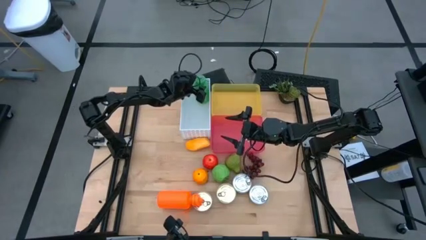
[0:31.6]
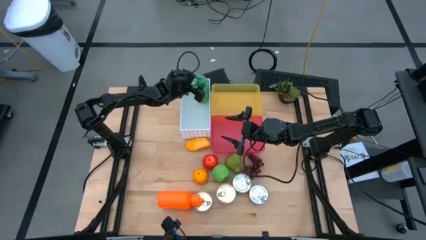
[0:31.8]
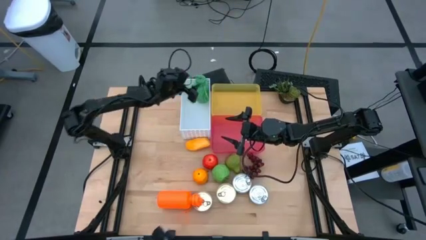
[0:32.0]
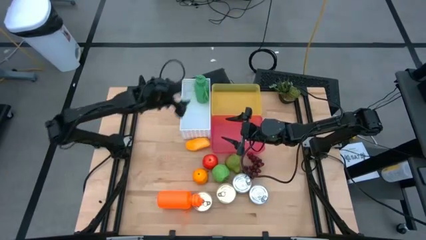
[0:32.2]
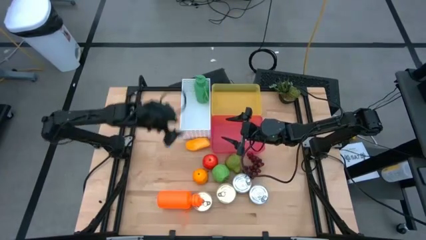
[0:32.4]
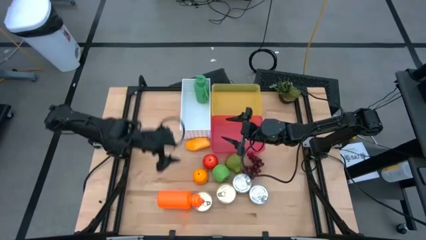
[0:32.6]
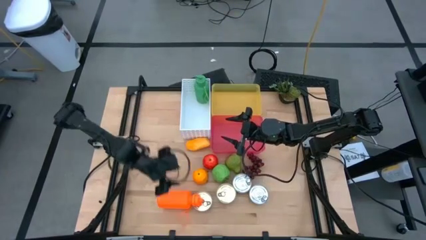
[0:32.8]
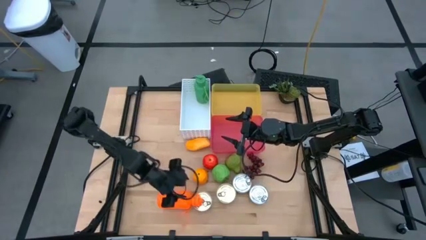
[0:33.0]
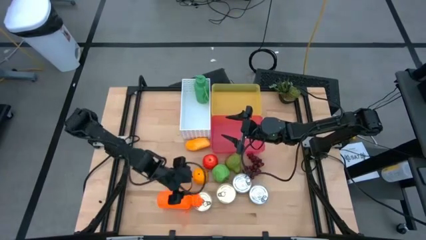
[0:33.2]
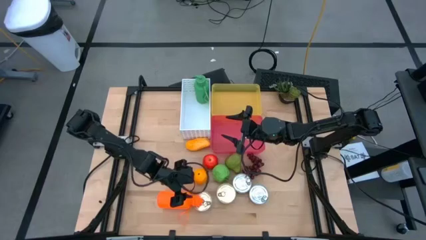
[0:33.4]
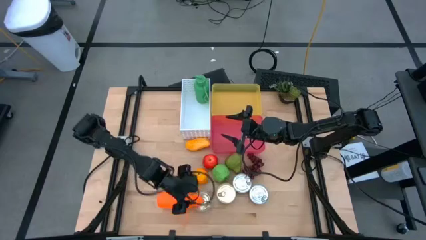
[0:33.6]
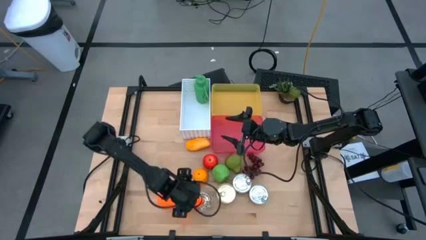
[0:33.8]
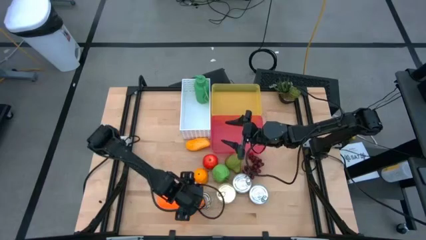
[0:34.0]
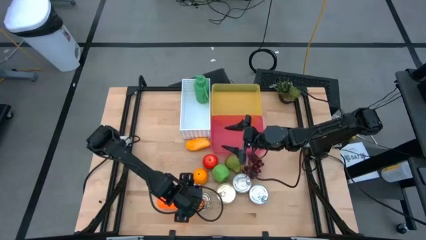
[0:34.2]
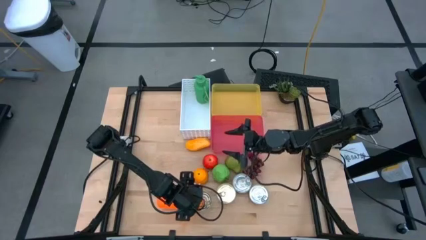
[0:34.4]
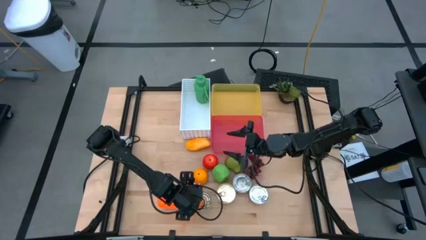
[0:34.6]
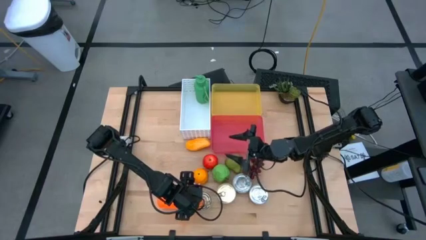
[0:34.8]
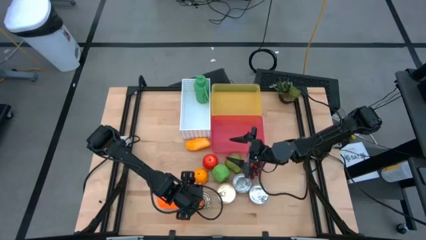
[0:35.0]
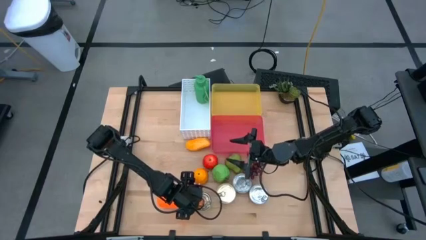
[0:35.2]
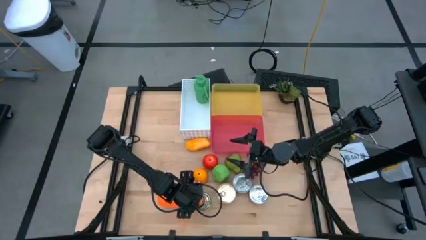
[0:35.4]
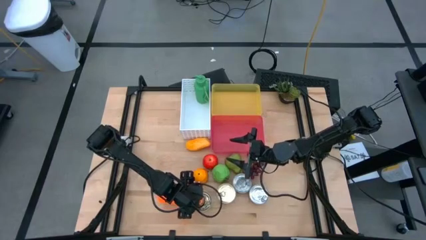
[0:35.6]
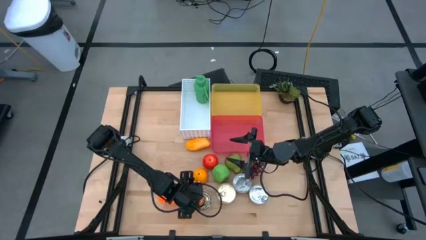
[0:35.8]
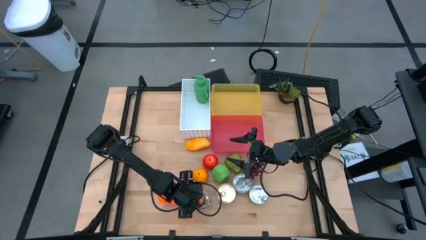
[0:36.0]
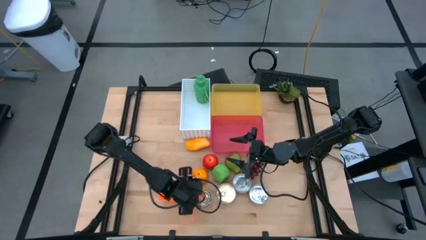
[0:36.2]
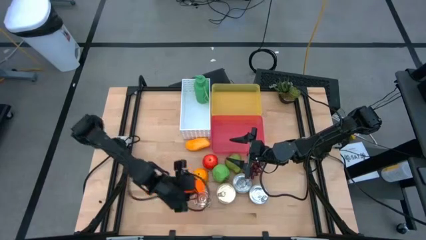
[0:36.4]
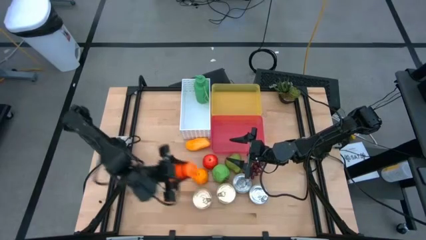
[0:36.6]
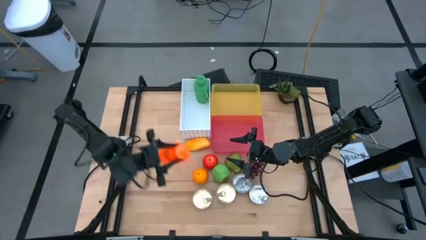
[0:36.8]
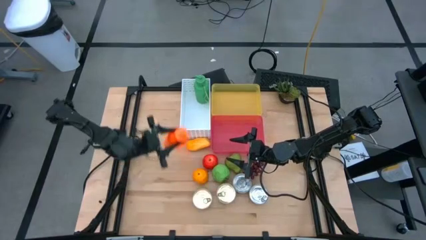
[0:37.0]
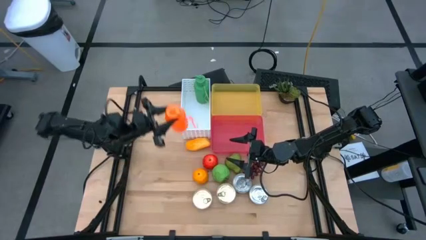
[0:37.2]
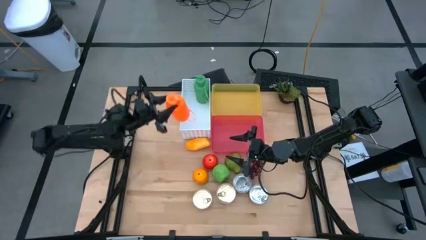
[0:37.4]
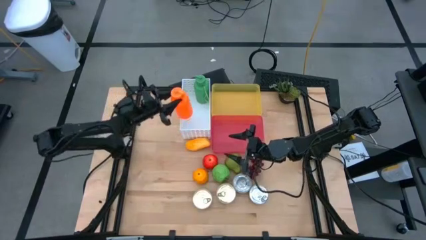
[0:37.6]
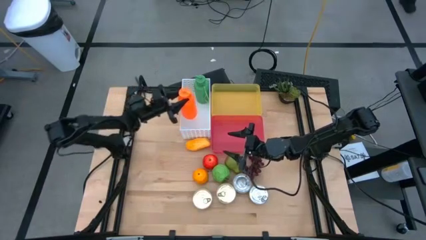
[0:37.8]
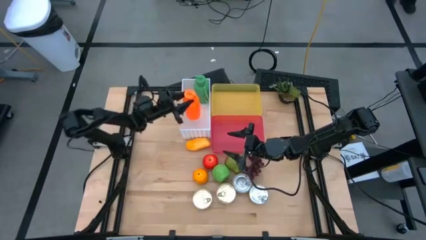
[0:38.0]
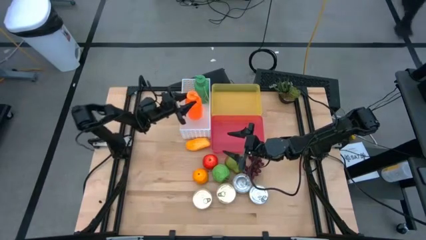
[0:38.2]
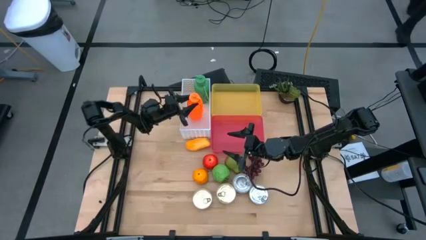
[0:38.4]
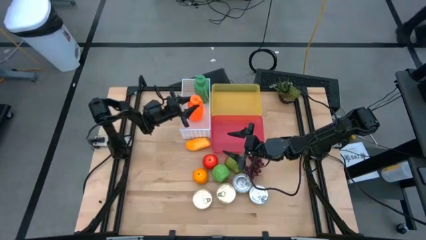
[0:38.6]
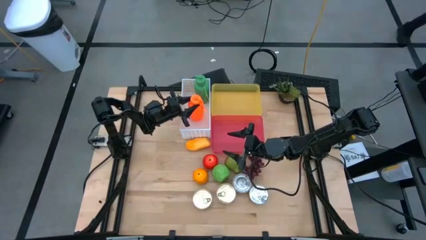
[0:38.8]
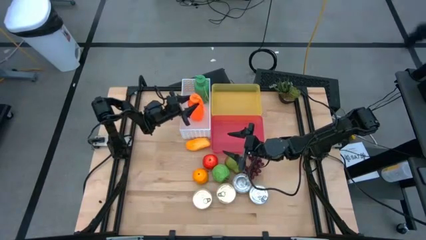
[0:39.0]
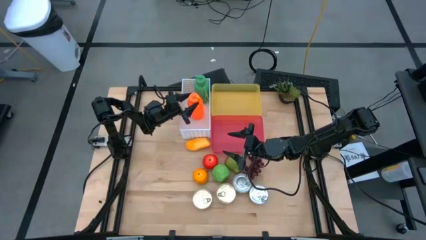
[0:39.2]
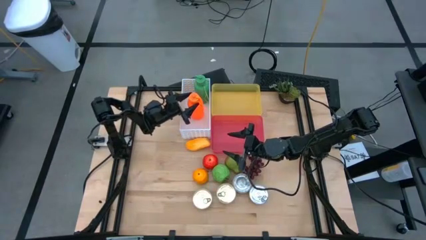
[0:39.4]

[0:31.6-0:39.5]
Task: Pick & Place Food Item
Put the orange water bottle into the white bin

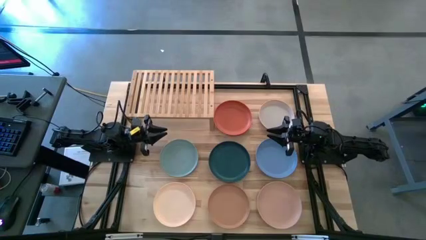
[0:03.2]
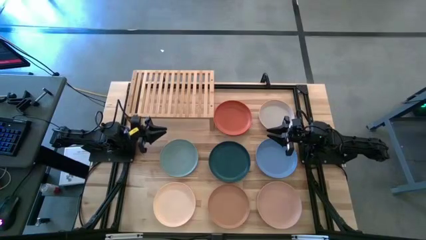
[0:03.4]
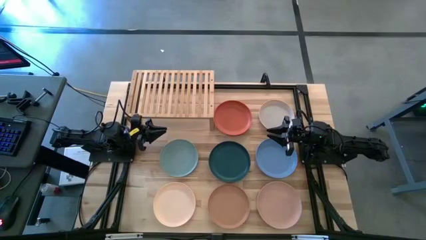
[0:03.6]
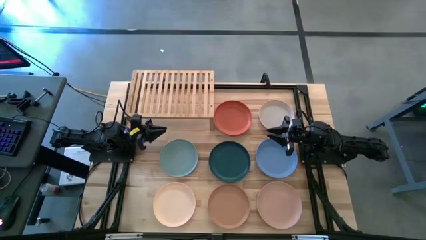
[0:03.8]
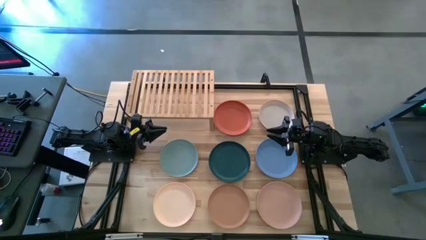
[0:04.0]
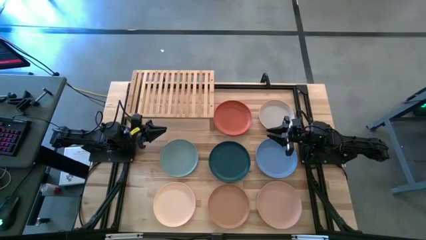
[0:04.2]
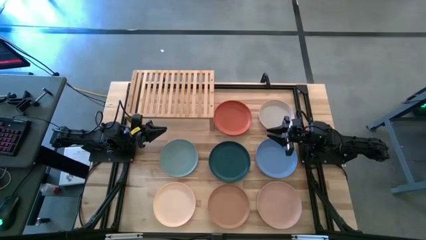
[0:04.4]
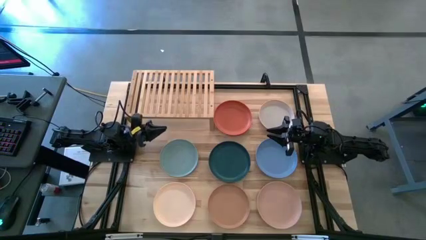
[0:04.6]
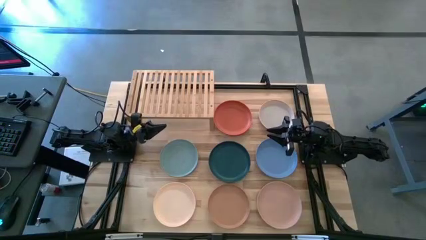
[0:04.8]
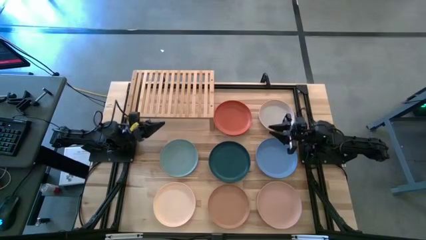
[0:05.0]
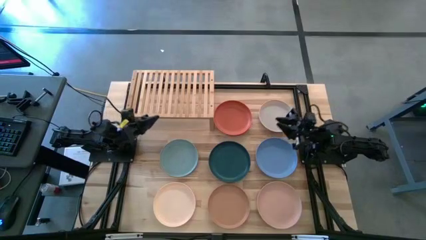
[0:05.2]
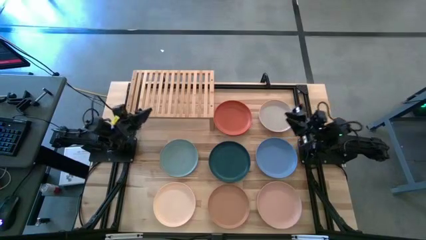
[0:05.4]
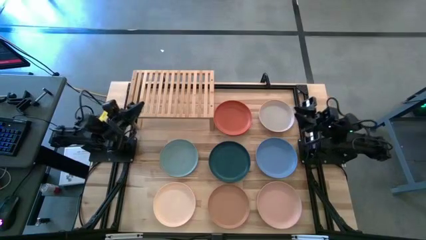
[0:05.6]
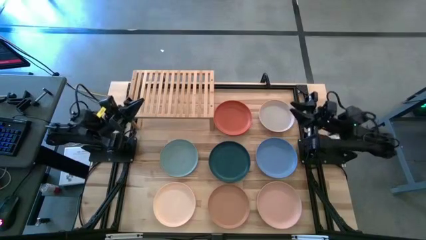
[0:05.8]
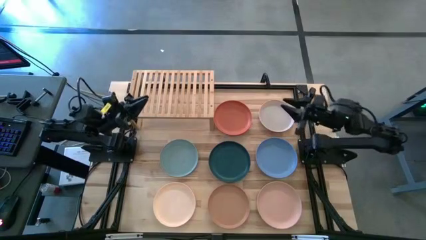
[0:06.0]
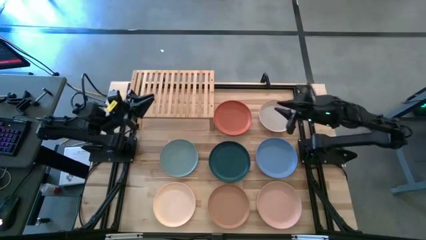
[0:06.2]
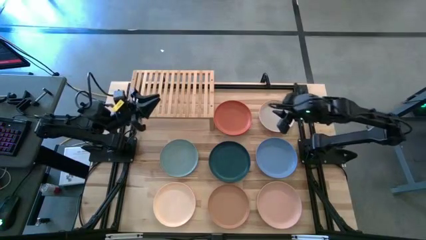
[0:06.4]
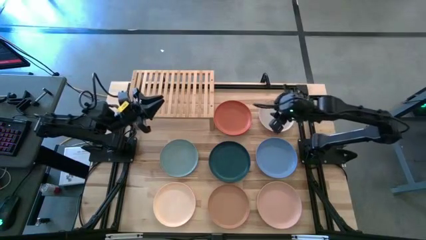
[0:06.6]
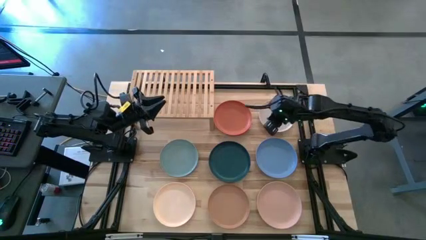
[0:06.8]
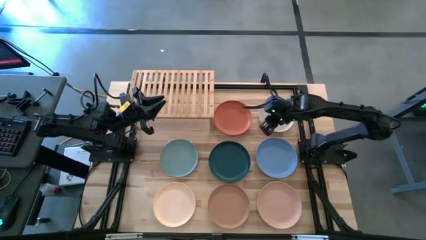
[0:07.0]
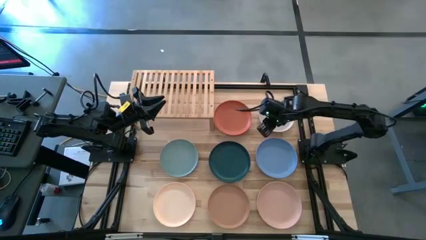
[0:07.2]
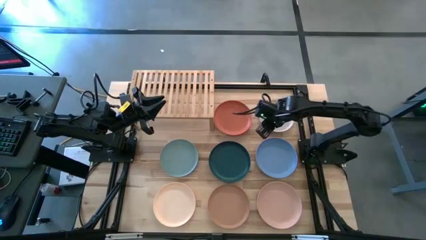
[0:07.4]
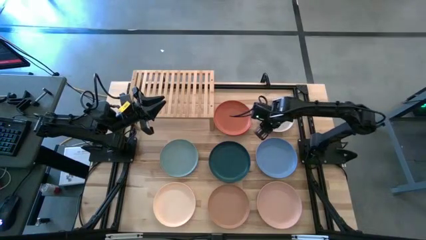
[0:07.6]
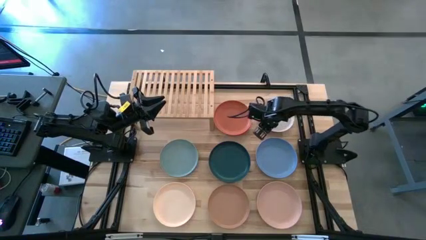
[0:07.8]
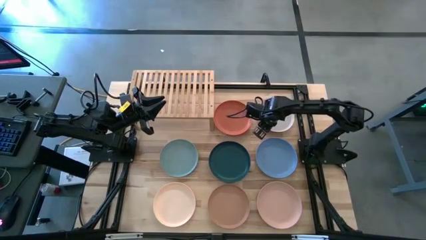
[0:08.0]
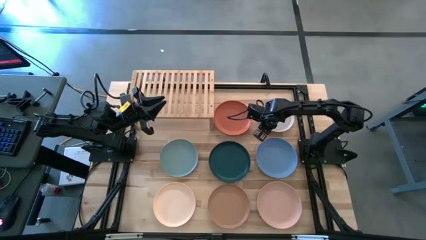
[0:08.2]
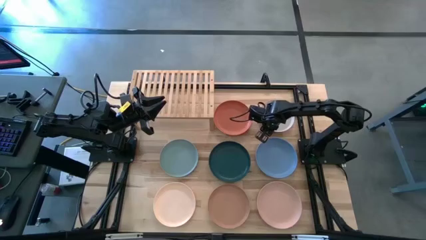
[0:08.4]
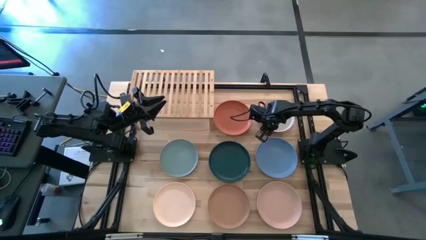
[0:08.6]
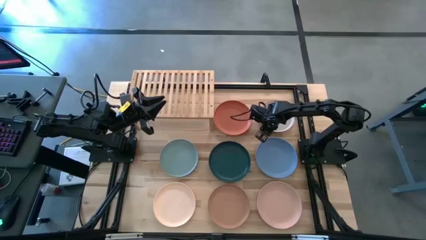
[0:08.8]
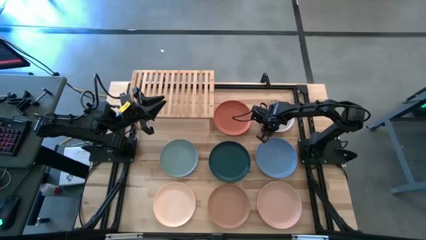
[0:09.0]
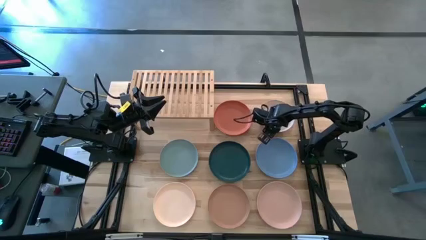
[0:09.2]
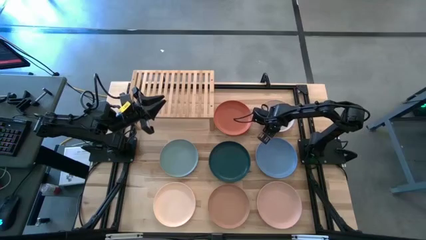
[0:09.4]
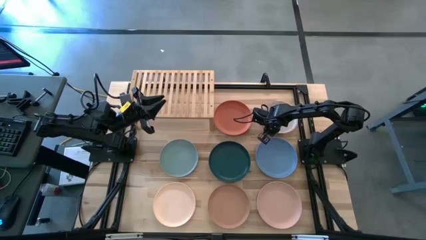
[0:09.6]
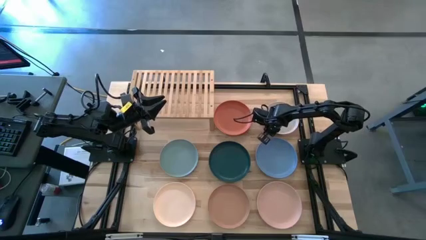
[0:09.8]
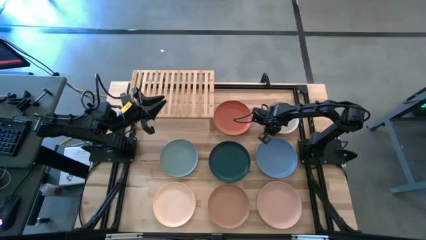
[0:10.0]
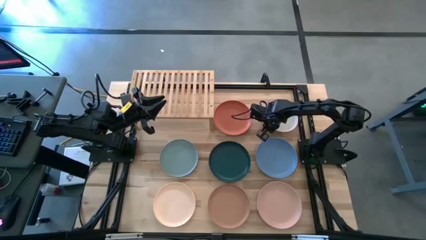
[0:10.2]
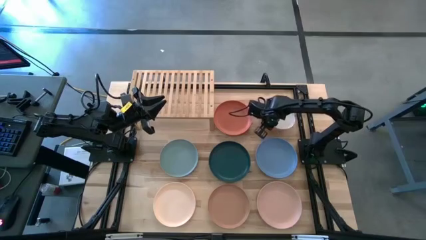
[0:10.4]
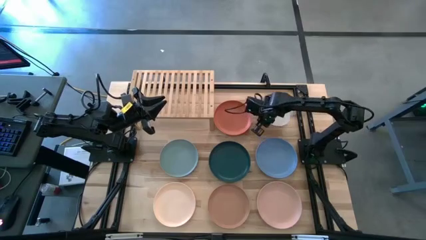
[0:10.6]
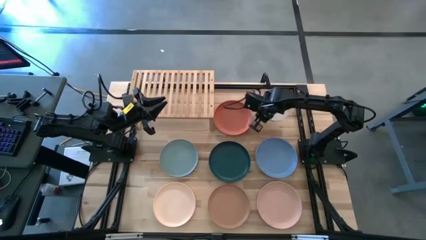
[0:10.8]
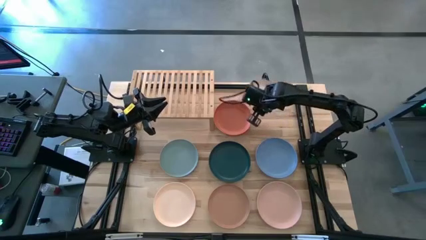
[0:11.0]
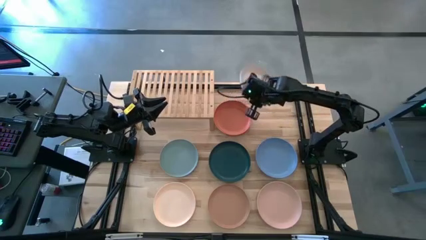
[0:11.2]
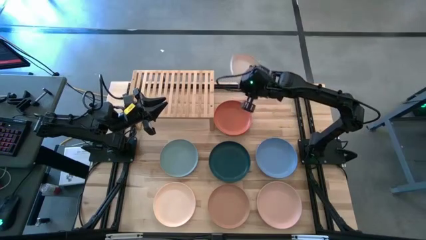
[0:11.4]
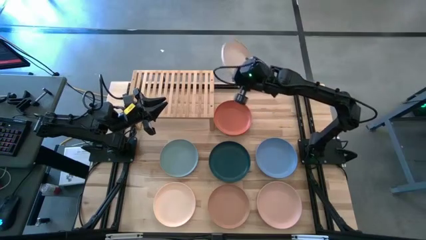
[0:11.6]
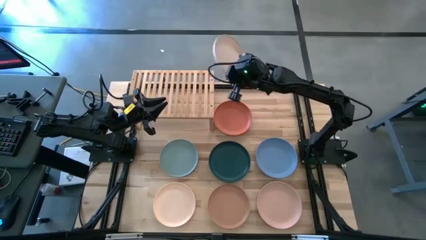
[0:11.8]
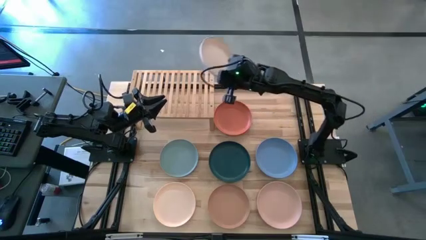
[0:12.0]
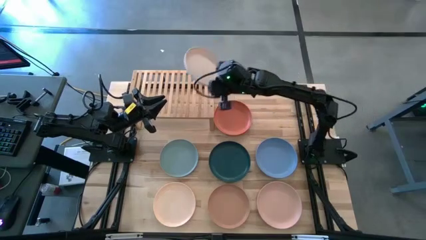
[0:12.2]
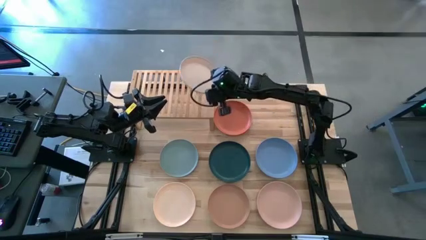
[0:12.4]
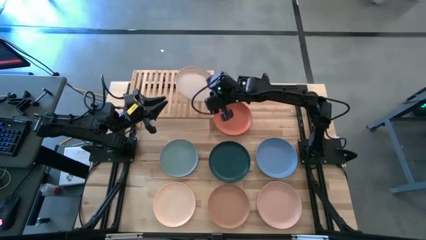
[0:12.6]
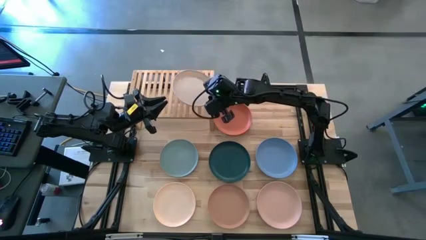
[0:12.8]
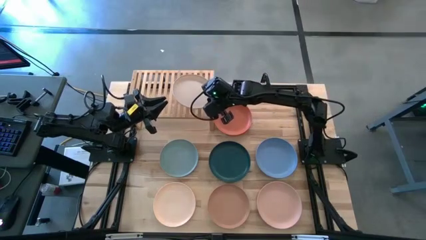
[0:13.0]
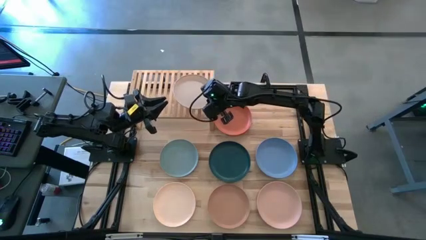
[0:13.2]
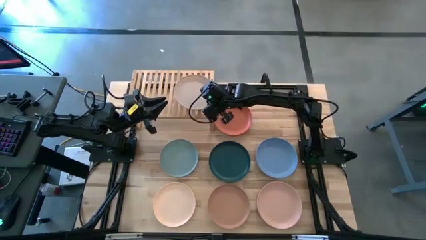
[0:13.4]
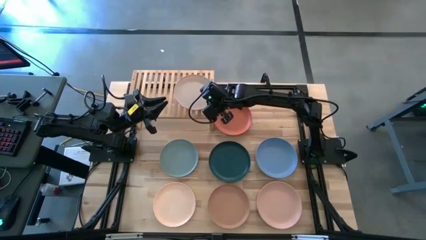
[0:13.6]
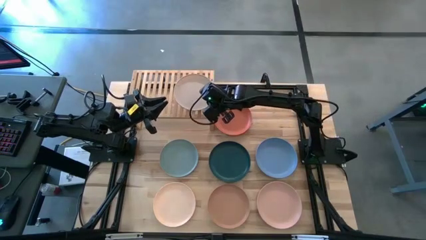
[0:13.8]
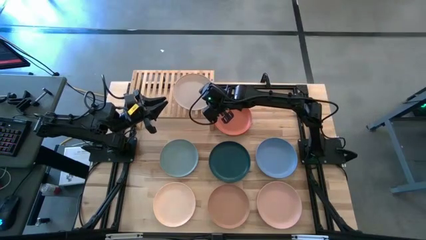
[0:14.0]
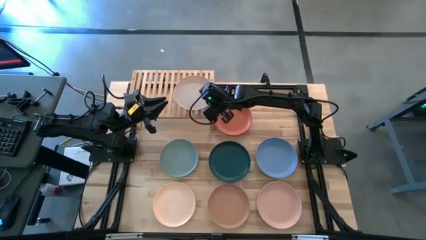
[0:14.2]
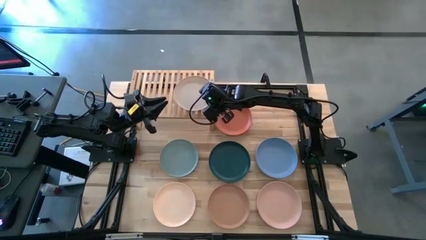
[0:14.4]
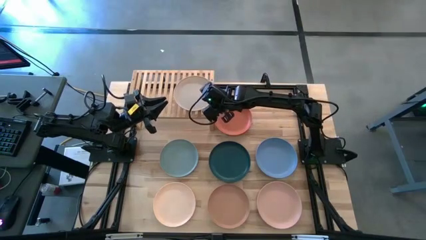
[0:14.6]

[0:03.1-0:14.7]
Task: Place and stack plates onto a shelf
Put the white plate on the shelf
